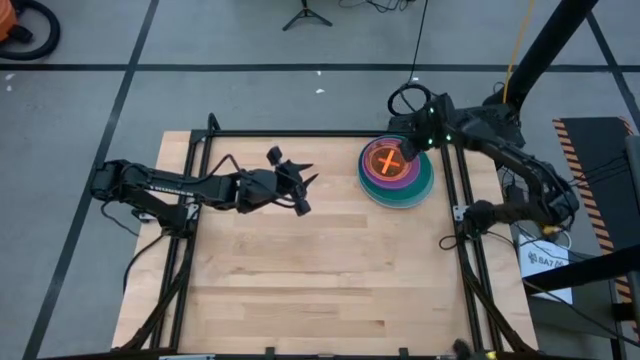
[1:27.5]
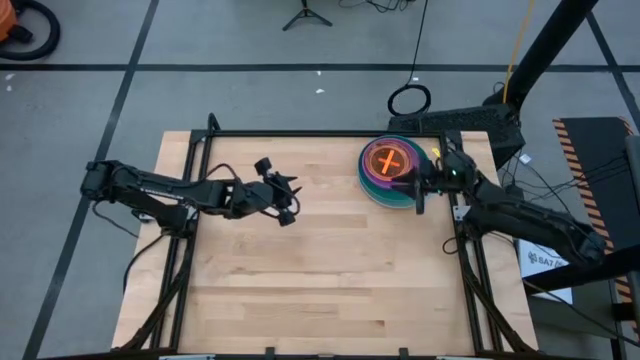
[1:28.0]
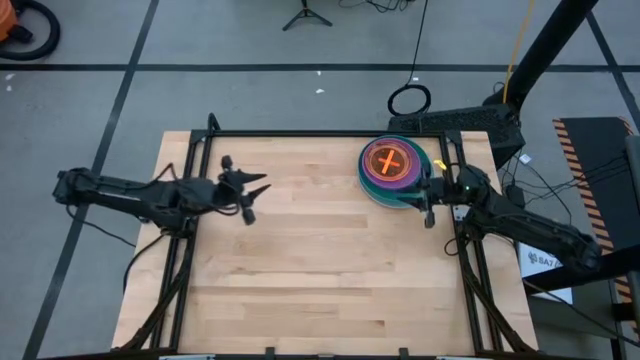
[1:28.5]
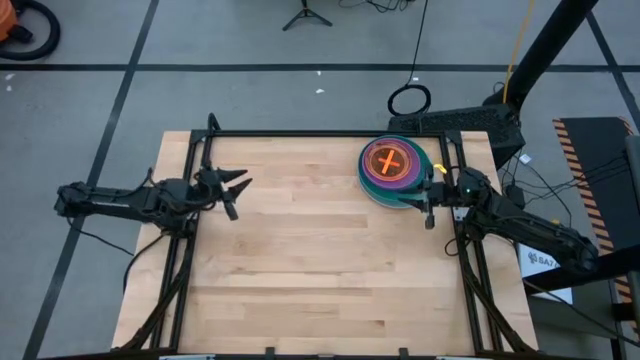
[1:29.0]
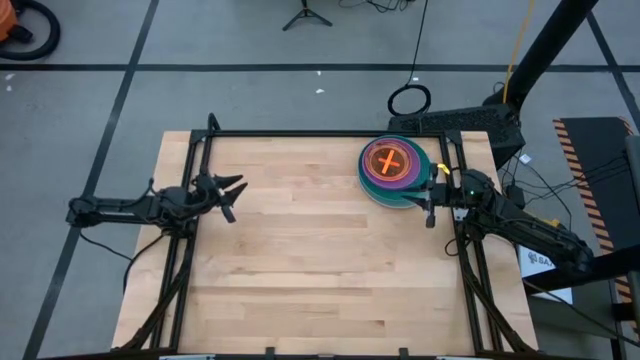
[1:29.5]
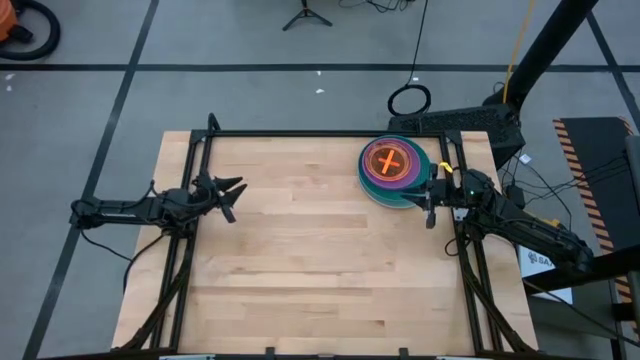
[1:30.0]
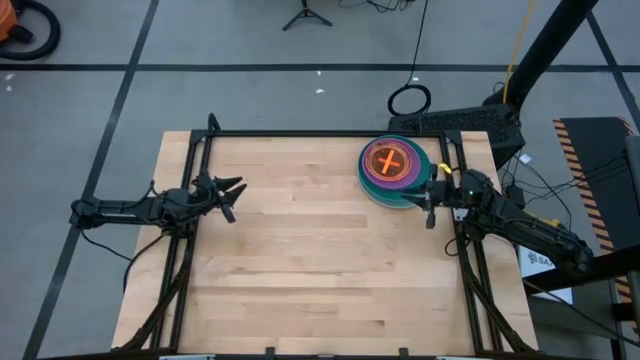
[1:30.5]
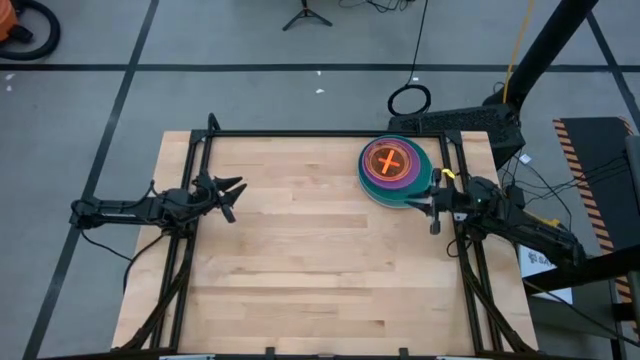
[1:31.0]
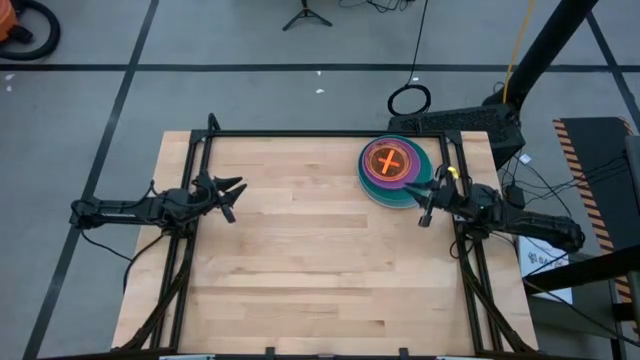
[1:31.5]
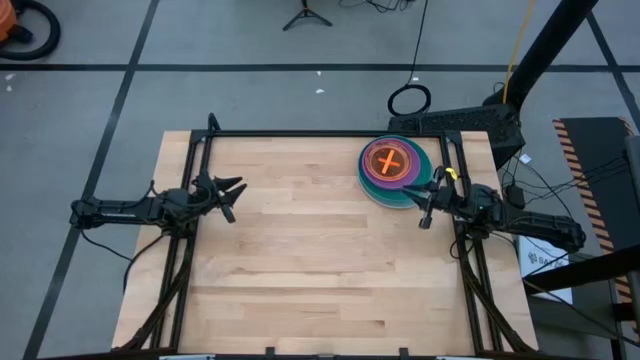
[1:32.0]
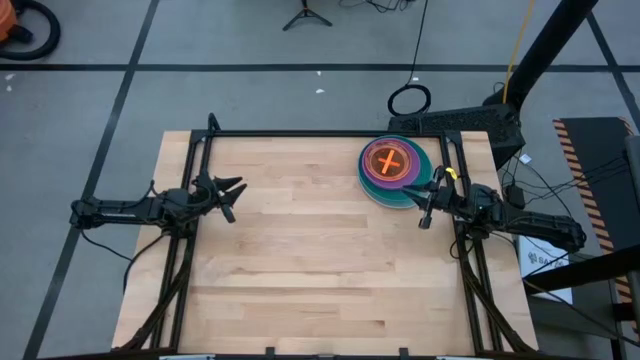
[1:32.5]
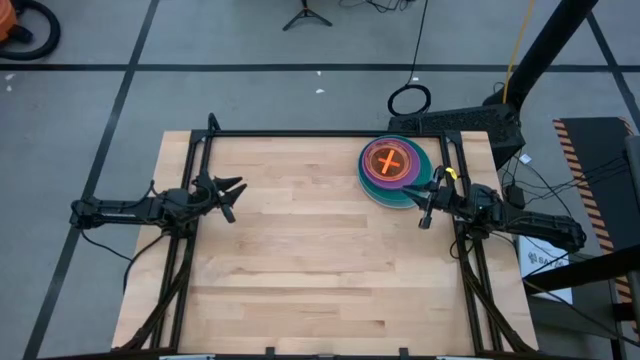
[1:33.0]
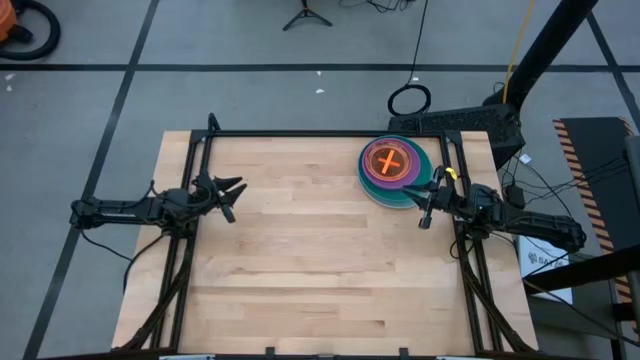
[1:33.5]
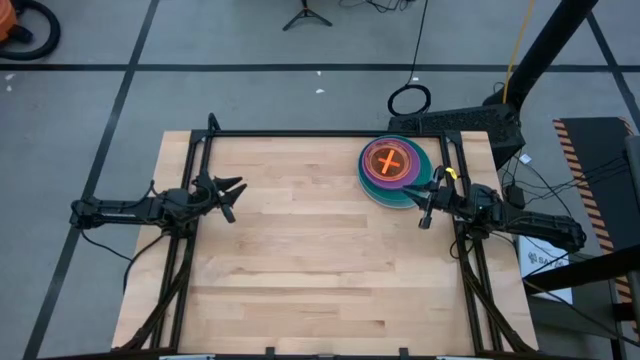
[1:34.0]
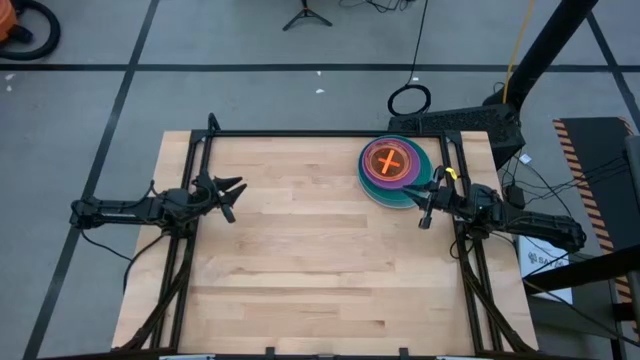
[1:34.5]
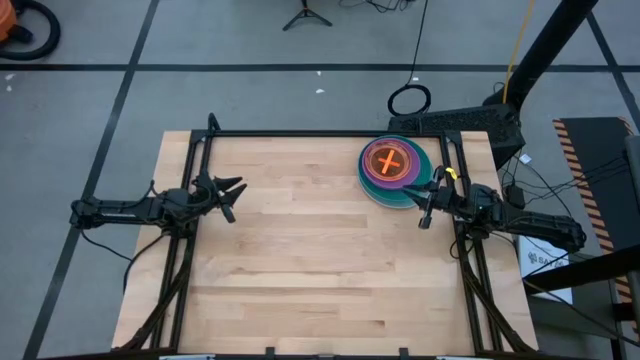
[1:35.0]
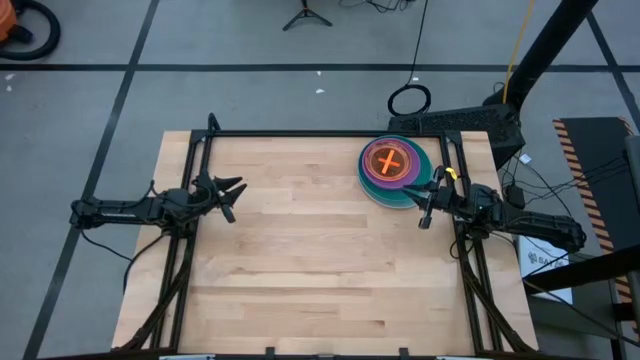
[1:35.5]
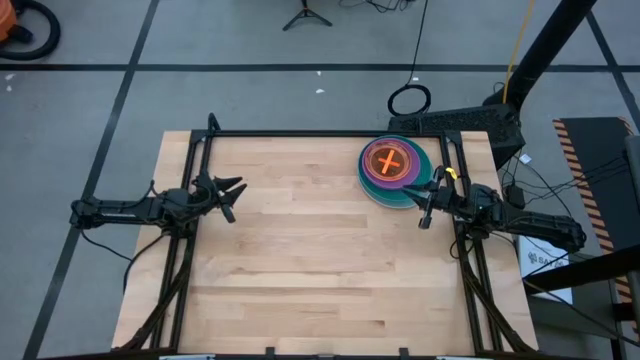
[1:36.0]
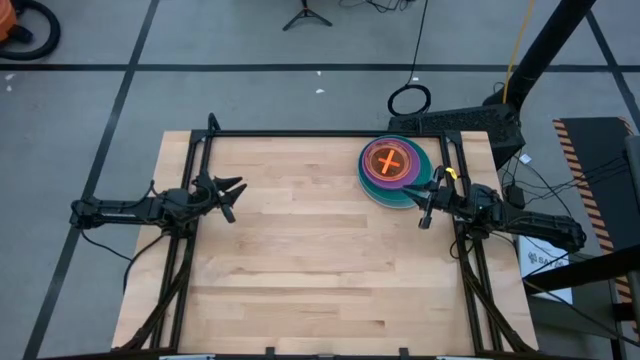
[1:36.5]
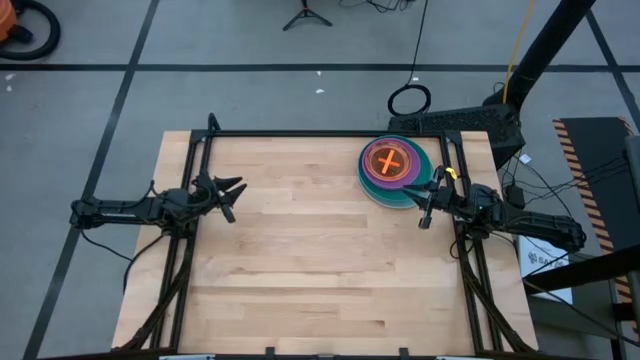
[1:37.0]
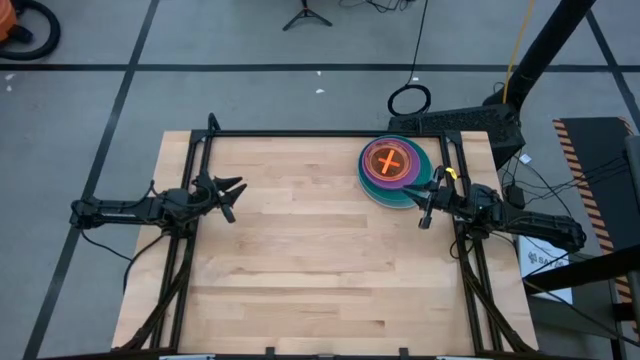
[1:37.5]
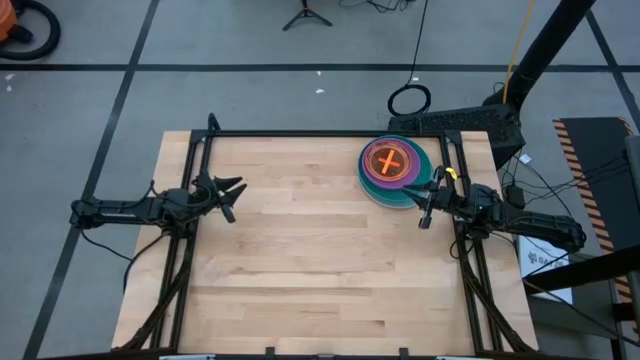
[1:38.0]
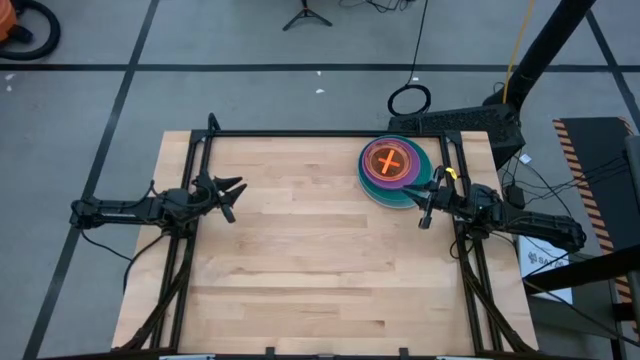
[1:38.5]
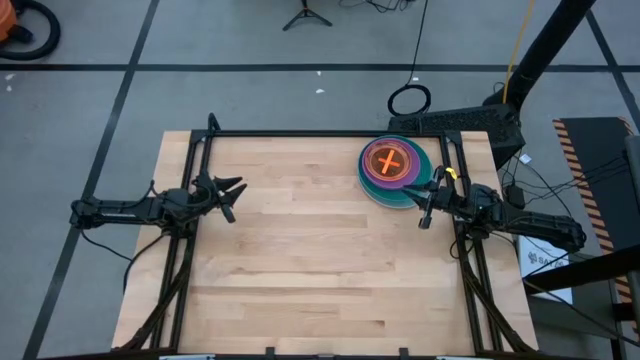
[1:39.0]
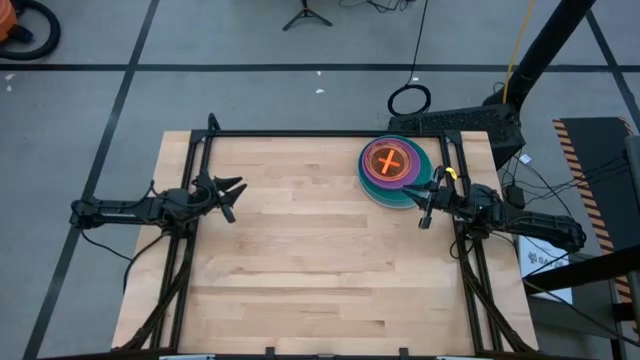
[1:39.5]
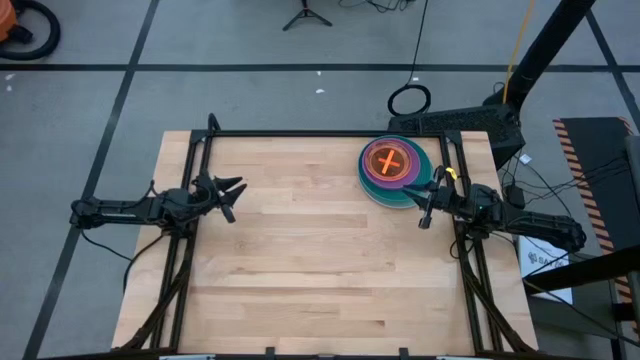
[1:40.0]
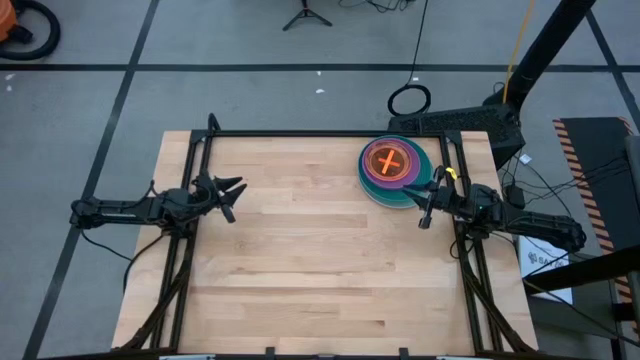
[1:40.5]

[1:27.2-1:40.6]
Task: Stack plastic plates
Return to Home Position

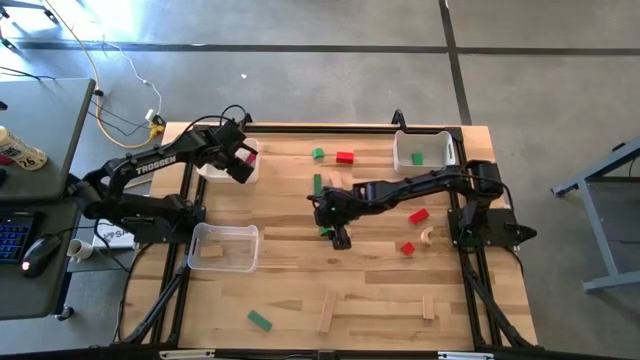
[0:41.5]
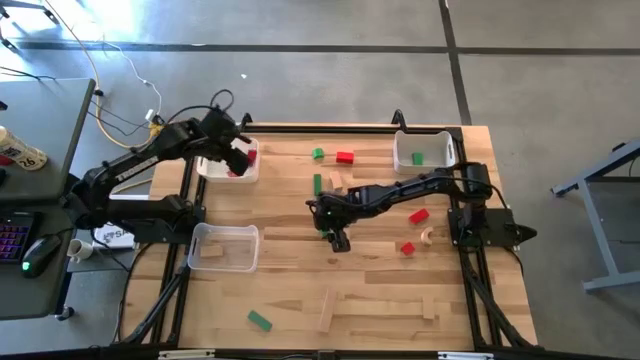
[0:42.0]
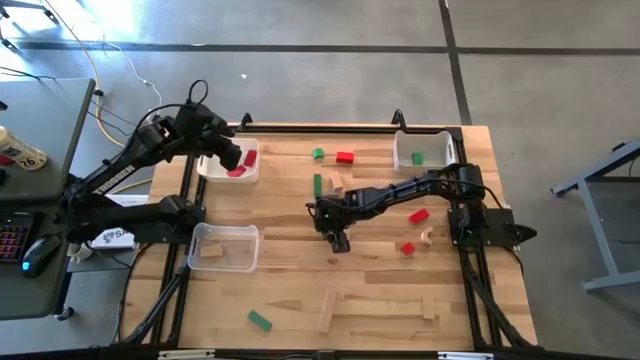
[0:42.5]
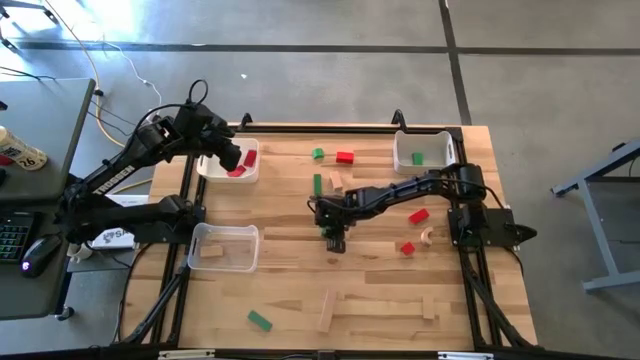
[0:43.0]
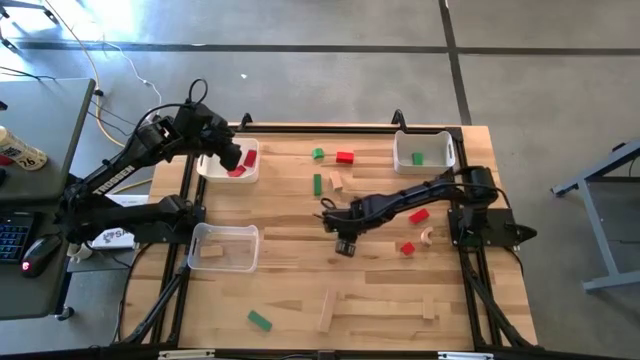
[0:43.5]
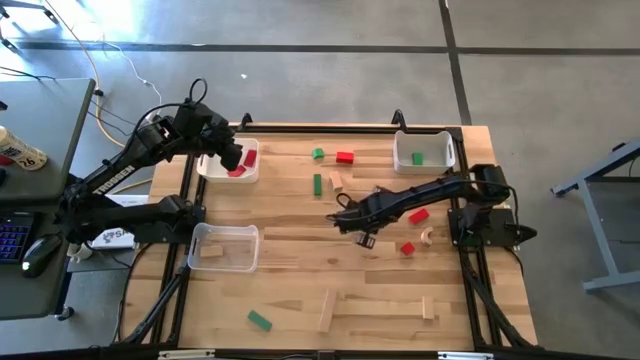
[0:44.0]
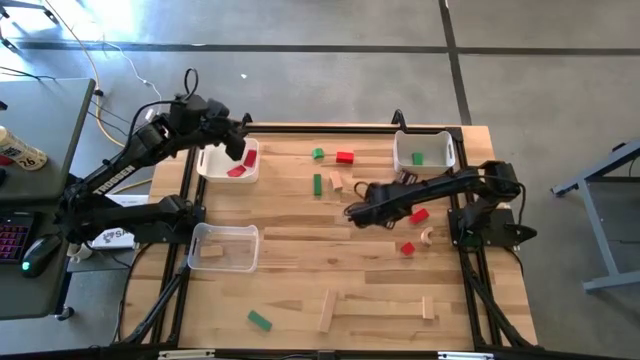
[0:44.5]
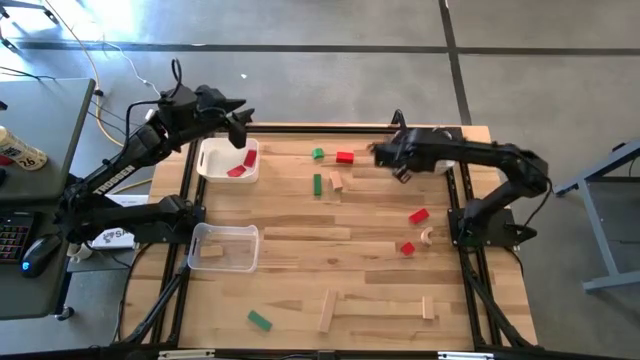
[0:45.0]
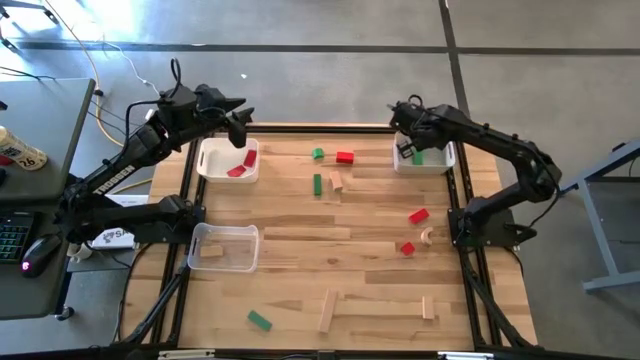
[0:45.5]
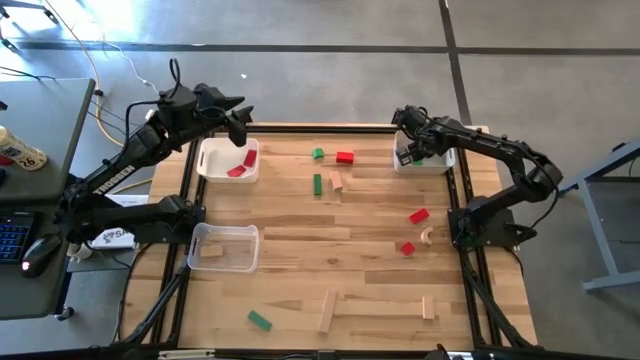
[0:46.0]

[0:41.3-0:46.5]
Task: Sort & place blocks by color
Put the green rectangle into the right white bin
